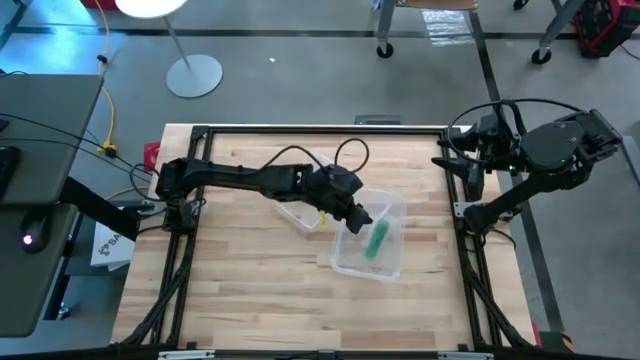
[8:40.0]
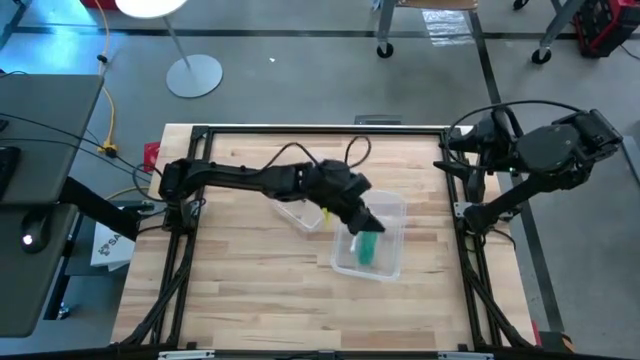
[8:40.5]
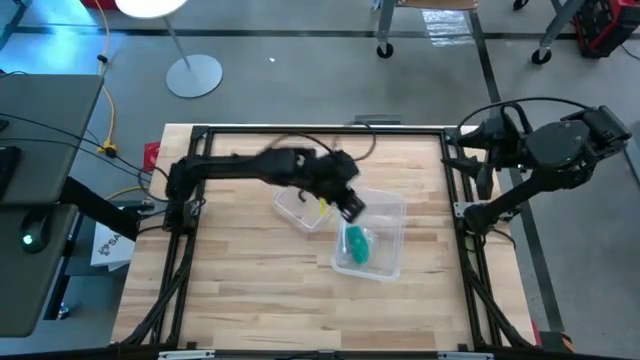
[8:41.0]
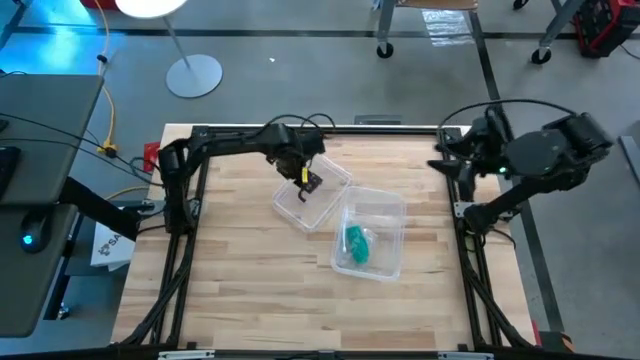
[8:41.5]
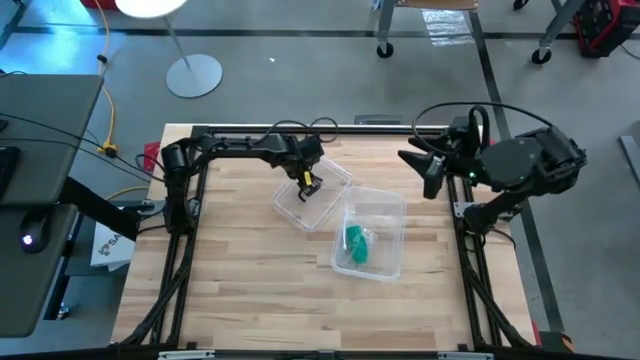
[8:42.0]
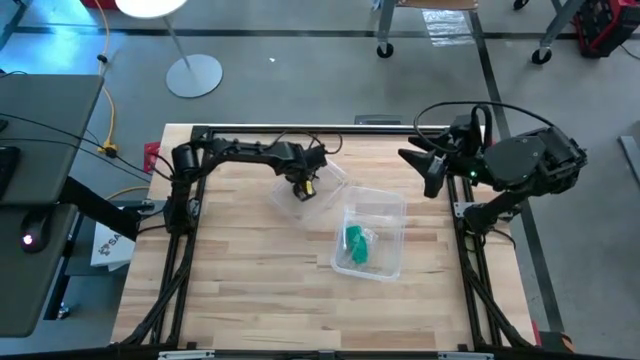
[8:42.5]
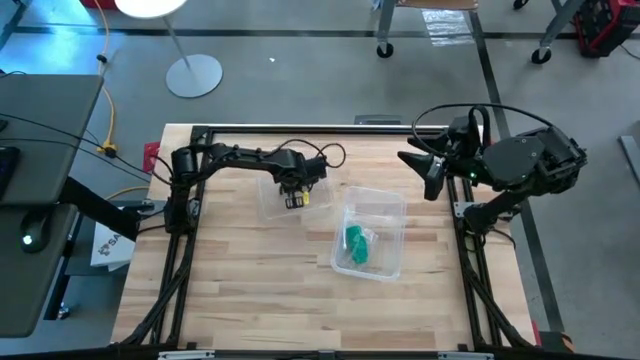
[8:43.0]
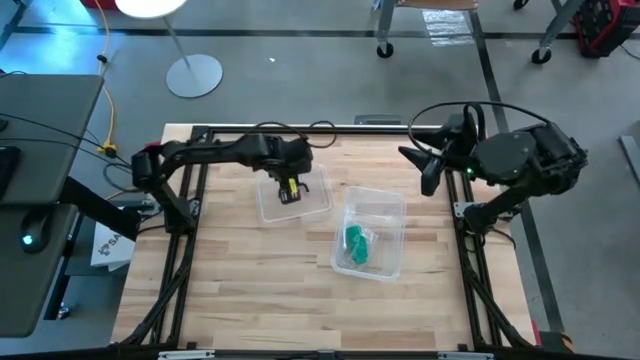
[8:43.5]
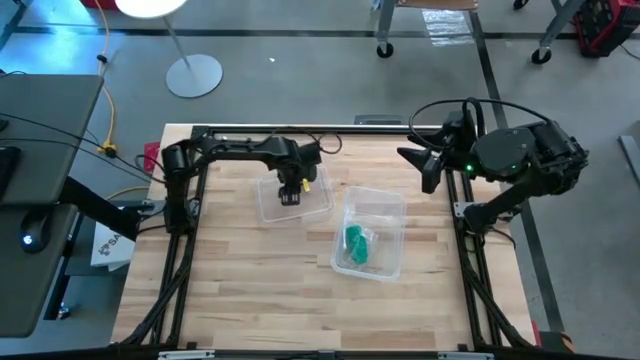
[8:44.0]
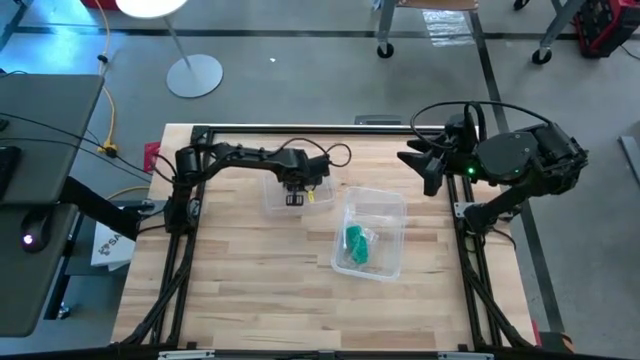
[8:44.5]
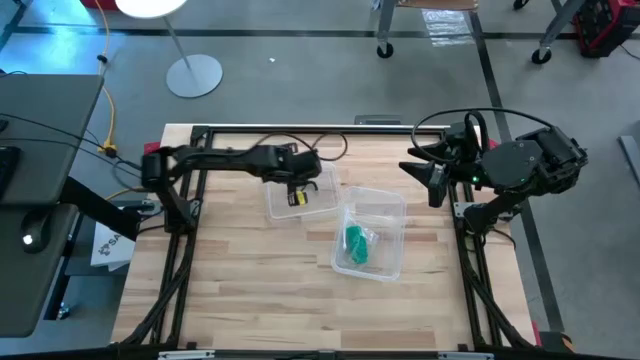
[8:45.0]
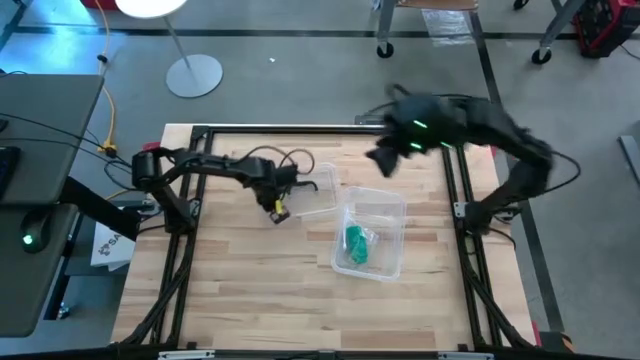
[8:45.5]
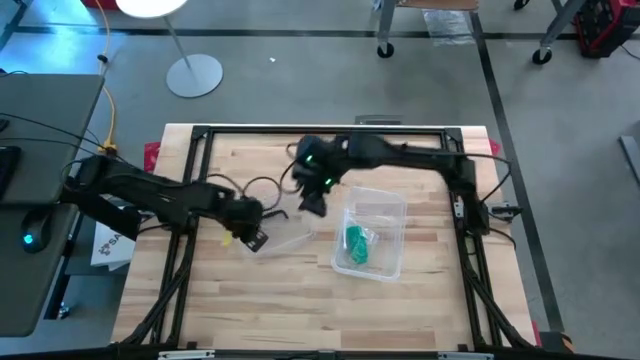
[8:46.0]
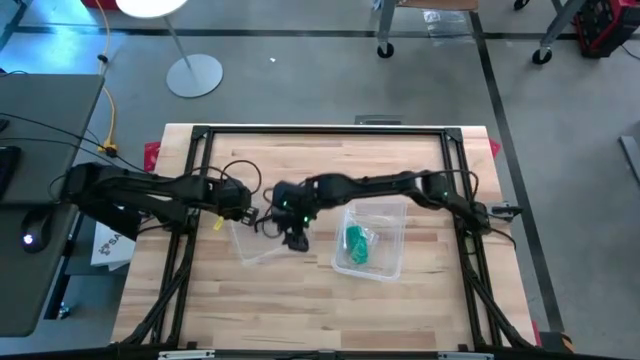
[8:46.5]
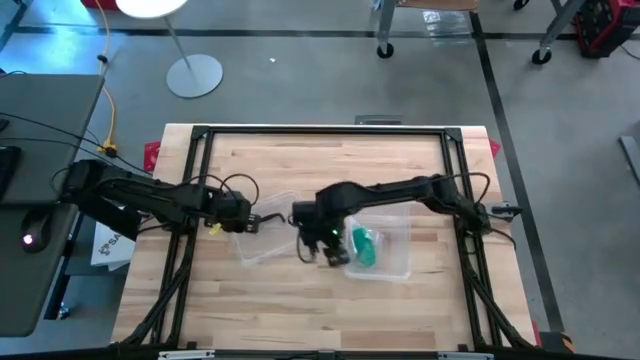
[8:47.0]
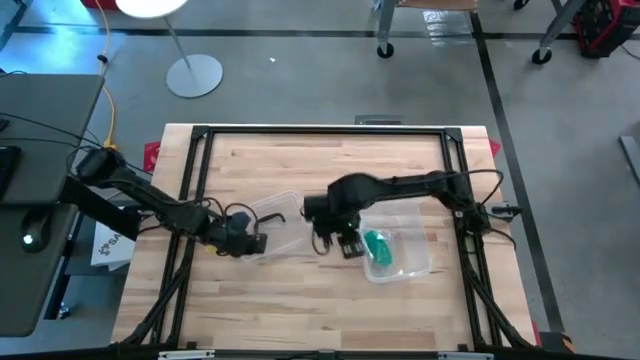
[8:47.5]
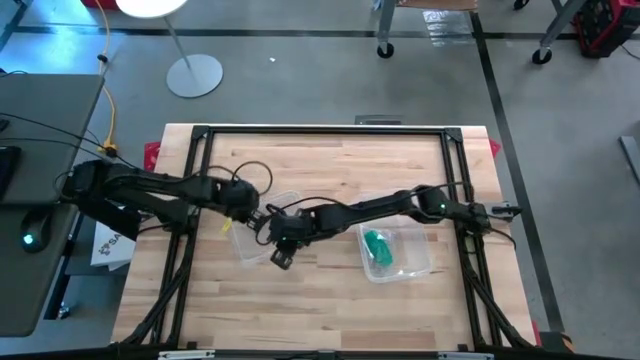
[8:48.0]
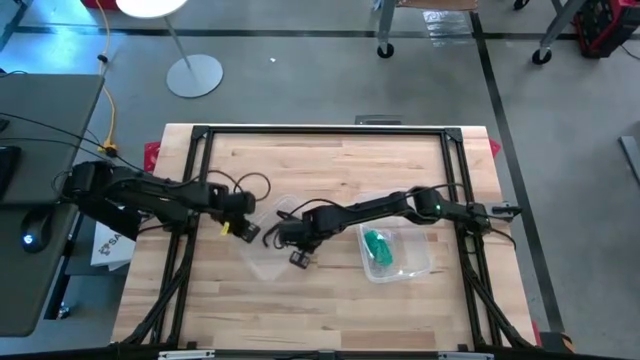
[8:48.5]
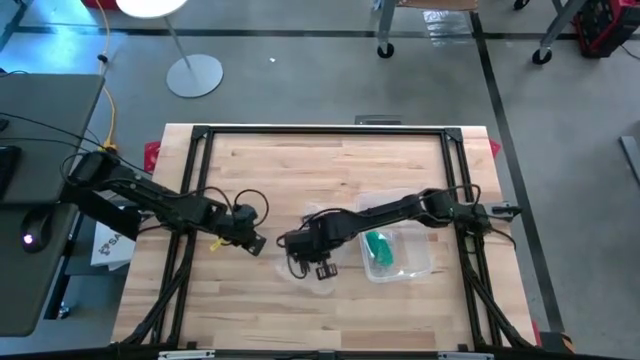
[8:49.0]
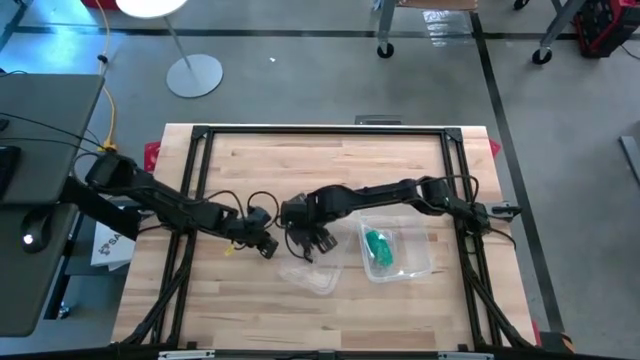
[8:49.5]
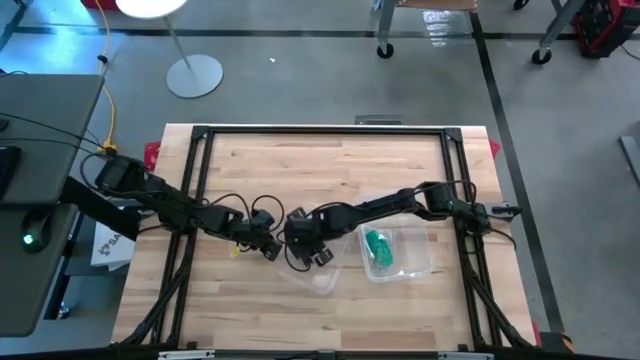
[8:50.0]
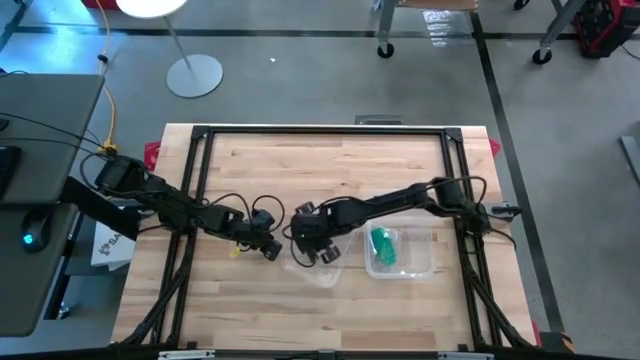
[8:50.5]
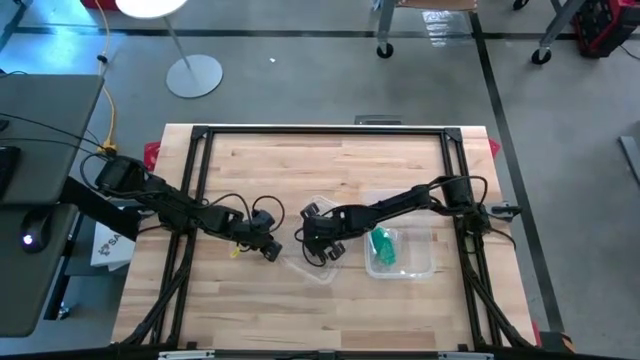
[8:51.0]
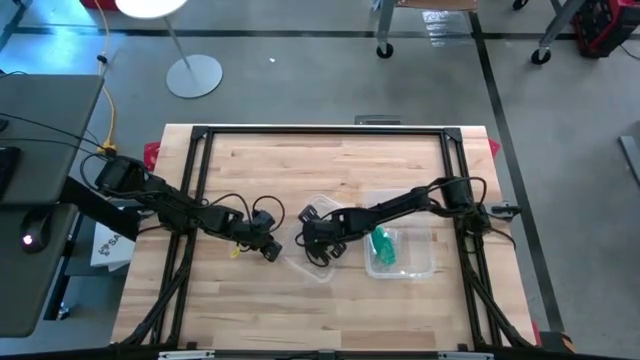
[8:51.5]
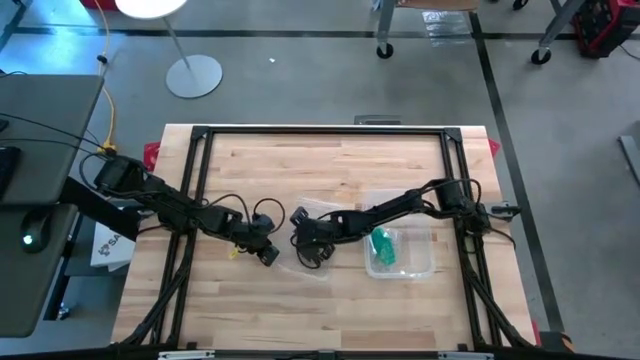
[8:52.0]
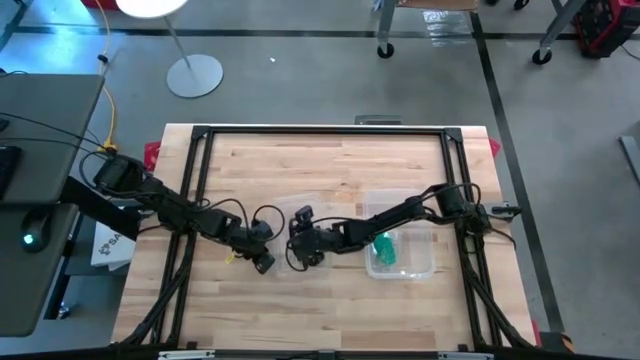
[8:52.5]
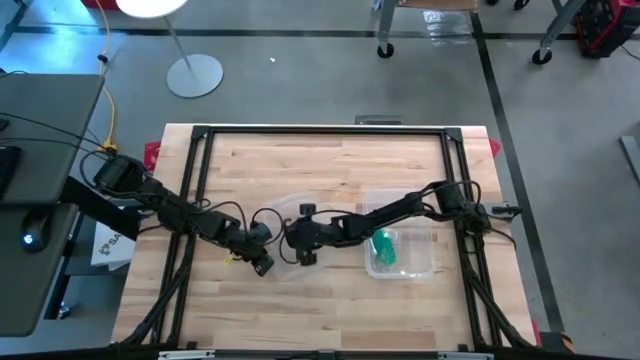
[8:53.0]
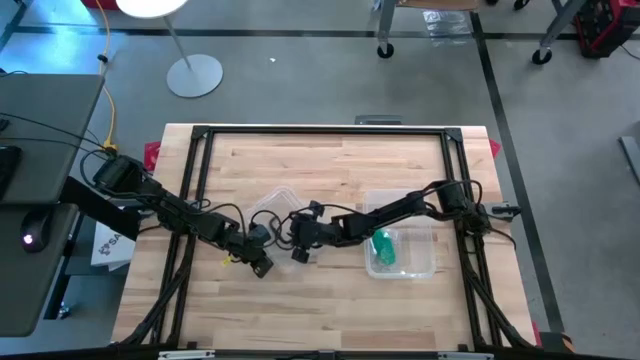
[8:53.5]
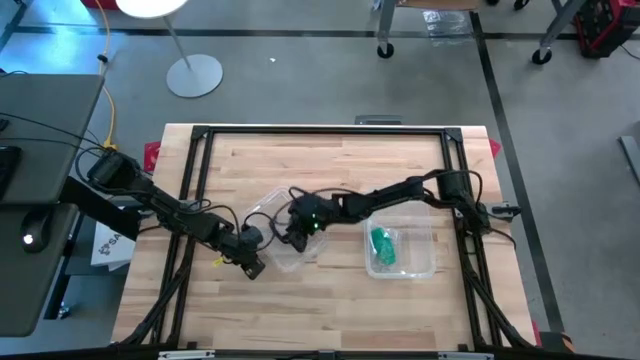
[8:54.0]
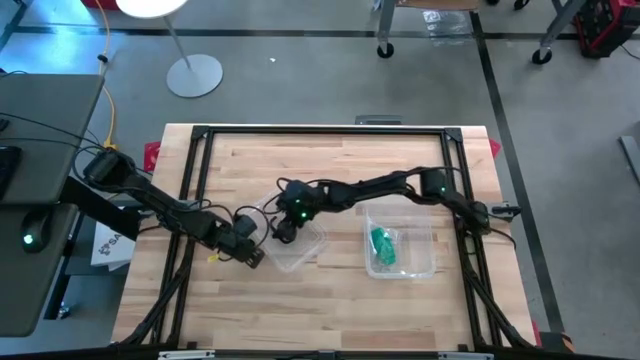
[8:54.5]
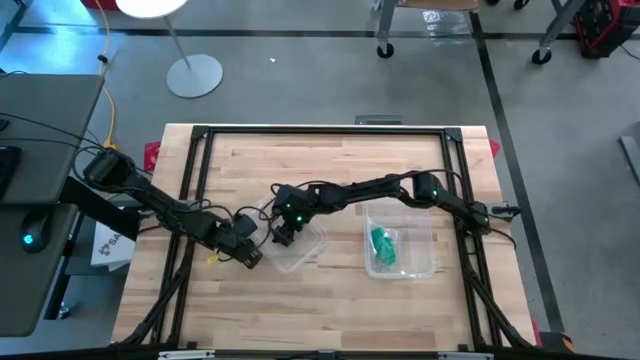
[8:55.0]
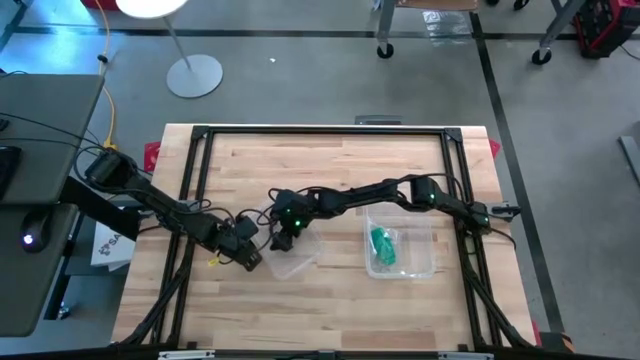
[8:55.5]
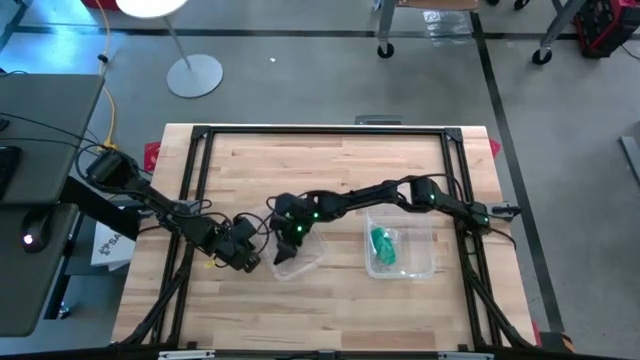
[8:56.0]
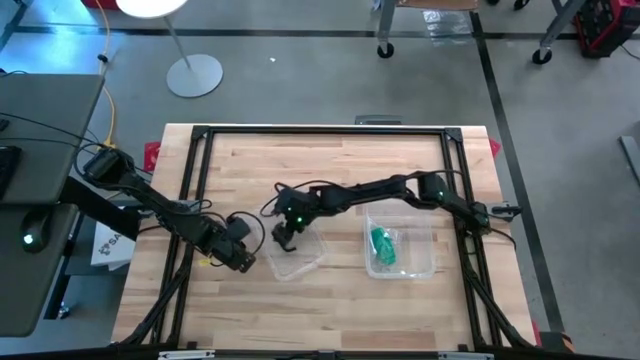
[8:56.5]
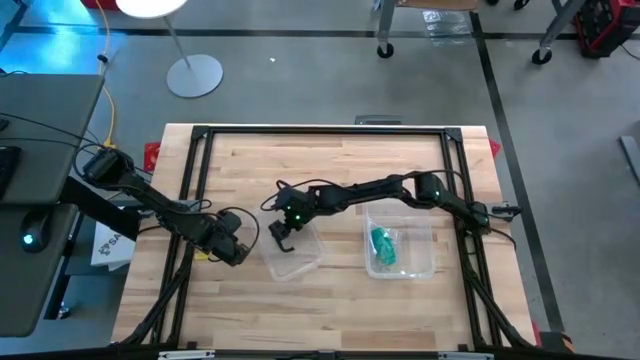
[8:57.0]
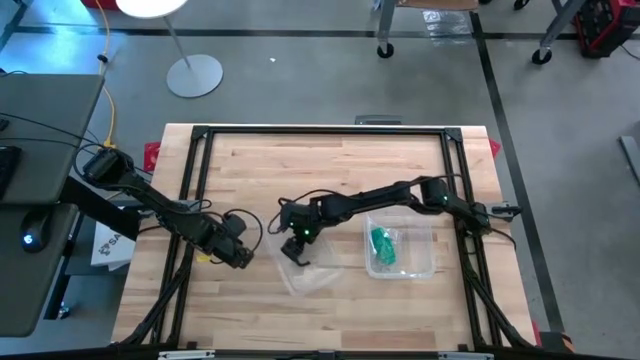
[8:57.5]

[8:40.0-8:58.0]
Task: Roll bandage
Close the transparent bin

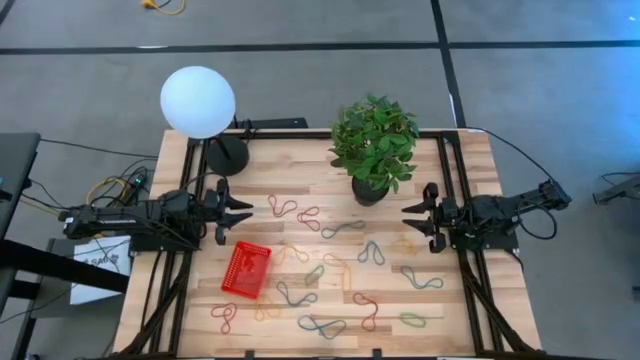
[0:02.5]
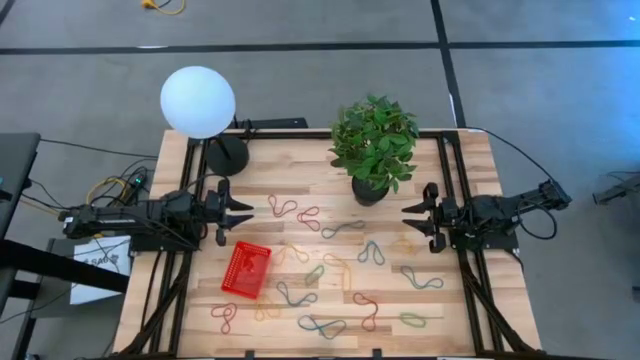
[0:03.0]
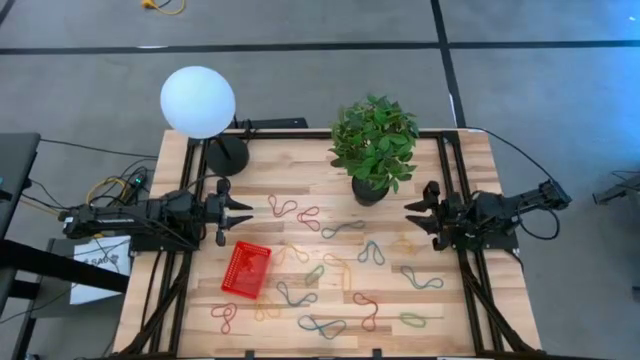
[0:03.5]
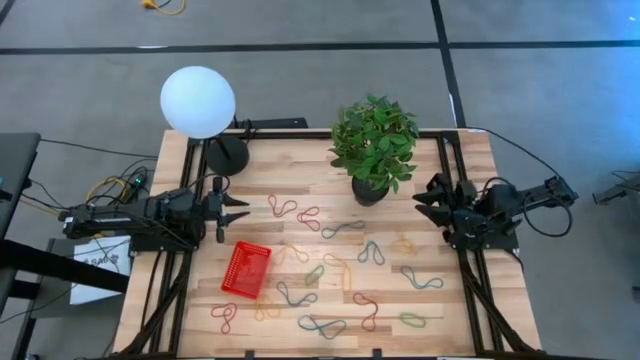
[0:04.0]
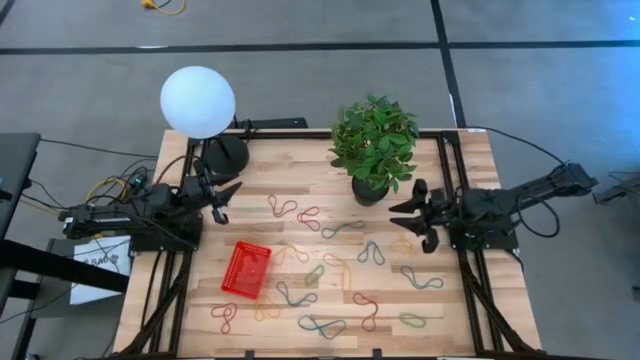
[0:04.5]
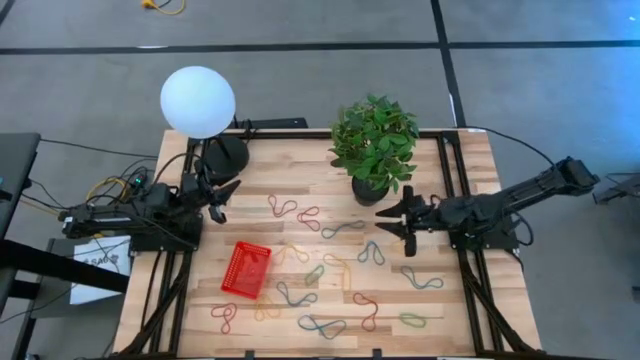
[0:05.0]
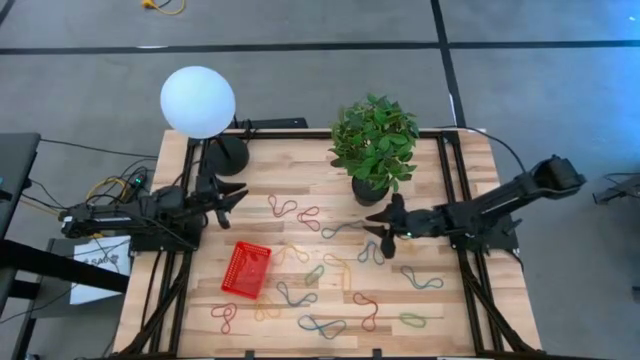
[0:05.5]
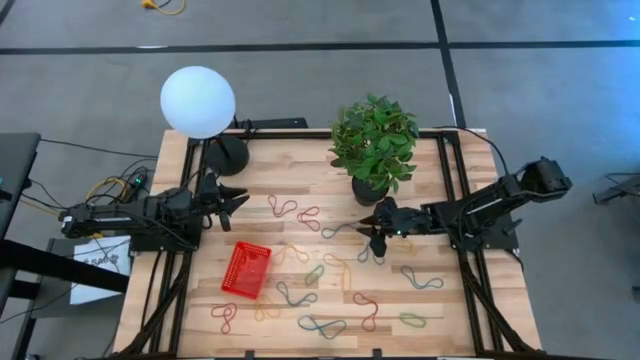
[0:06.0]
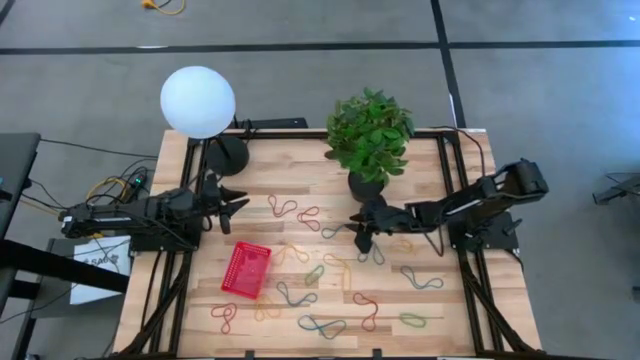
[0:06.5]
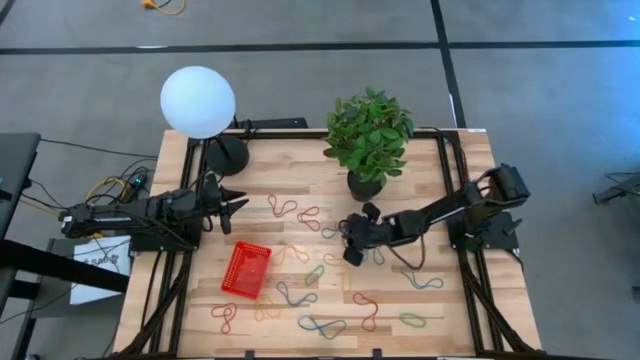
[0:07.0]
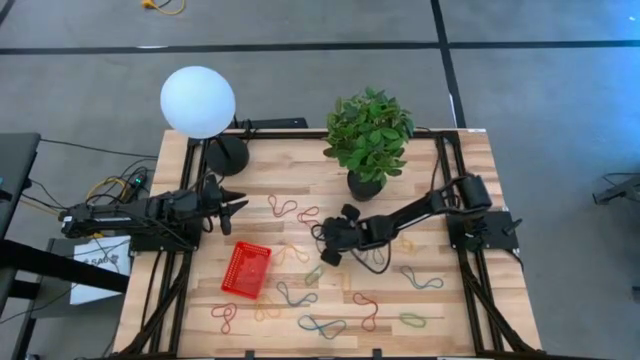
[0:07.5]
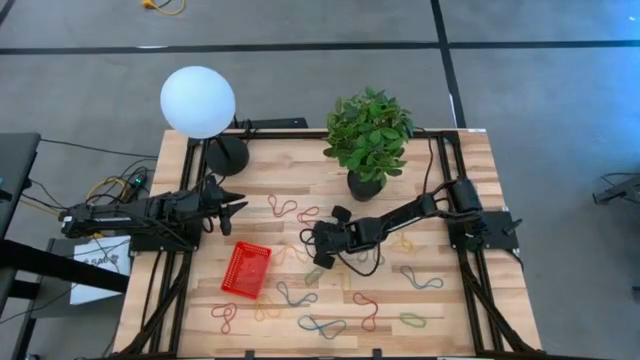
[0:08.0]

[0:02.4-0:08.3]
Task: Pick and place items into bin
Put the blue rubber band into the red bin
